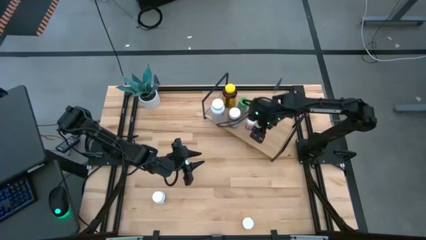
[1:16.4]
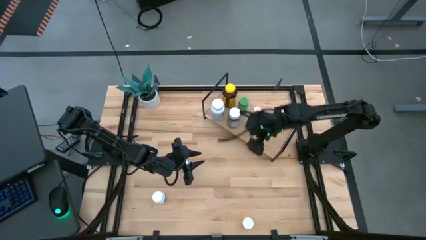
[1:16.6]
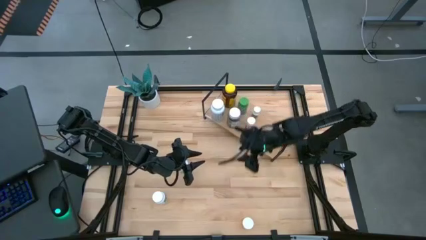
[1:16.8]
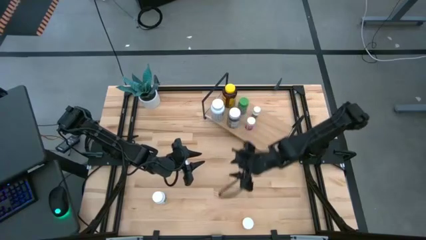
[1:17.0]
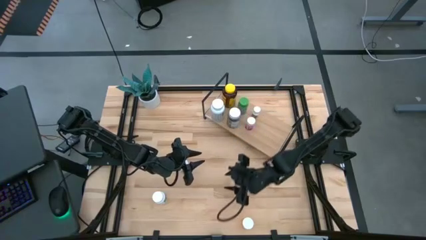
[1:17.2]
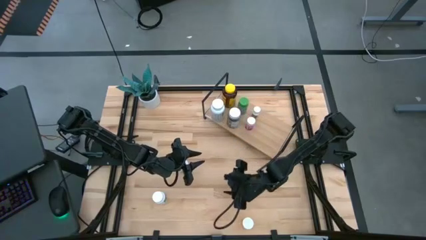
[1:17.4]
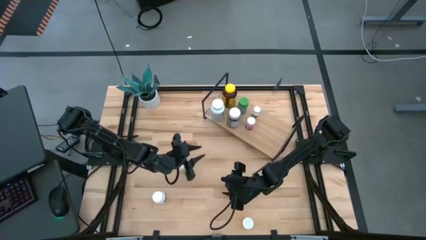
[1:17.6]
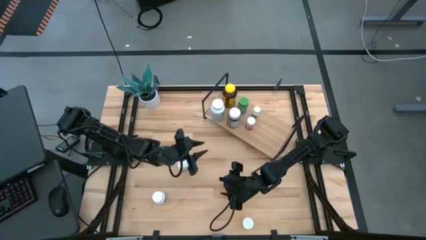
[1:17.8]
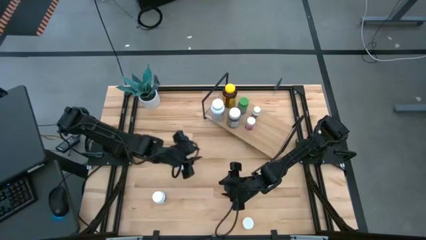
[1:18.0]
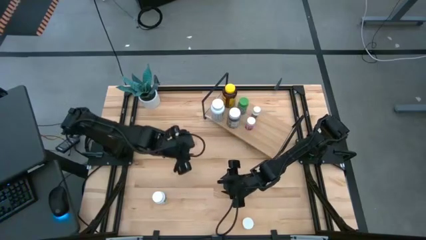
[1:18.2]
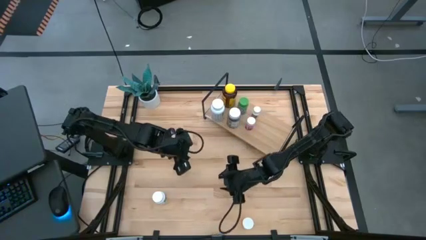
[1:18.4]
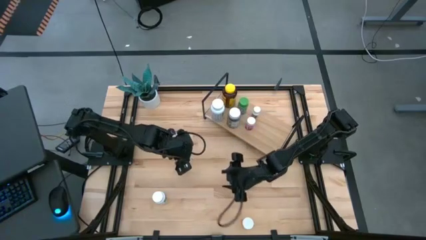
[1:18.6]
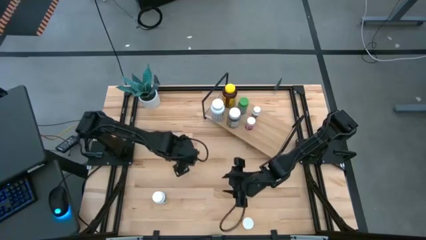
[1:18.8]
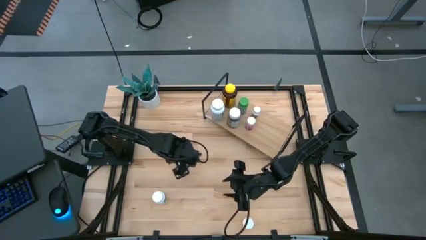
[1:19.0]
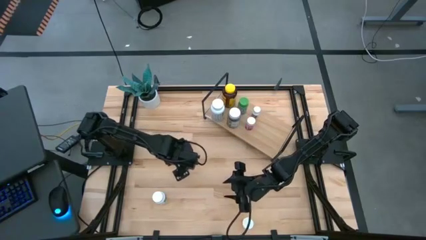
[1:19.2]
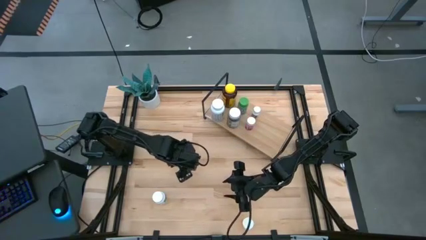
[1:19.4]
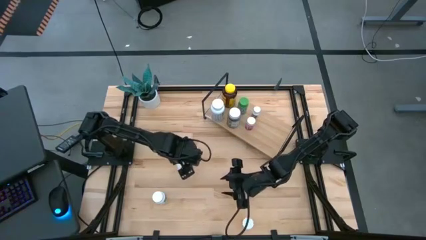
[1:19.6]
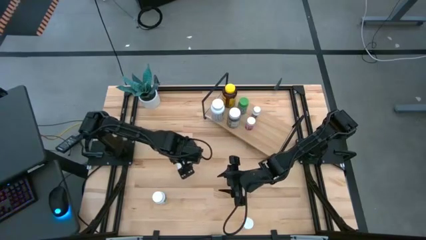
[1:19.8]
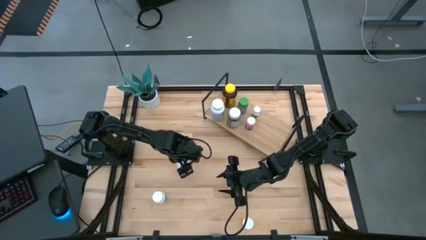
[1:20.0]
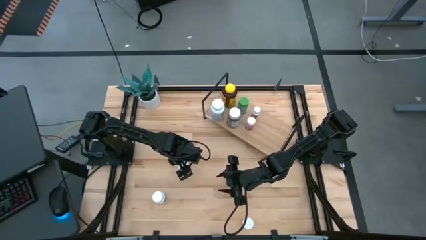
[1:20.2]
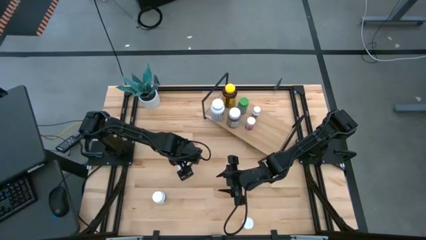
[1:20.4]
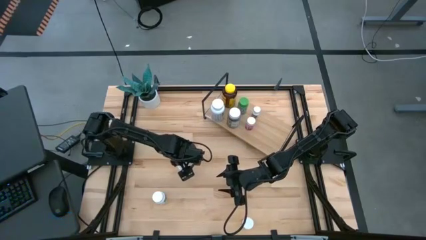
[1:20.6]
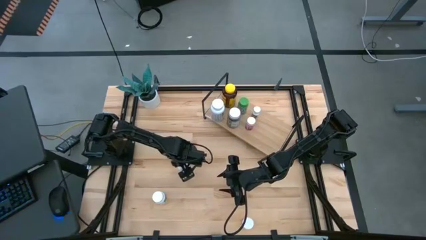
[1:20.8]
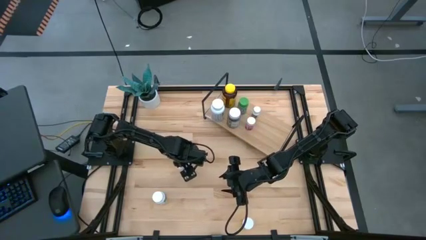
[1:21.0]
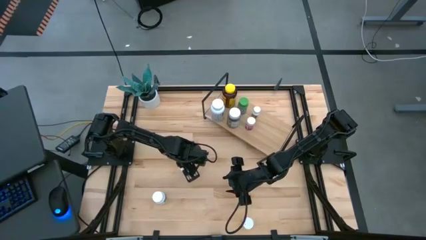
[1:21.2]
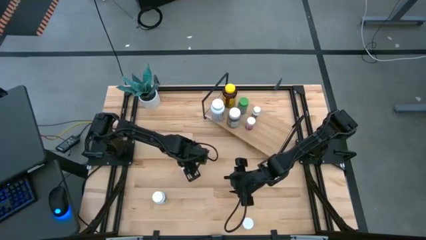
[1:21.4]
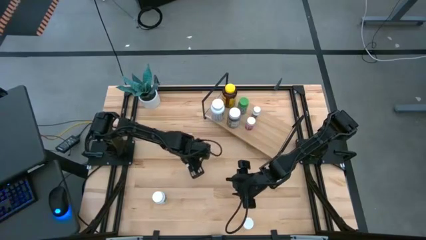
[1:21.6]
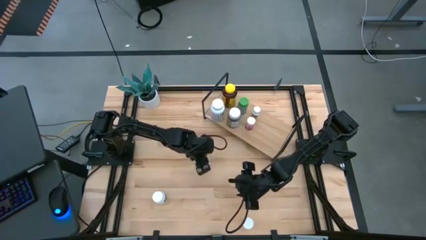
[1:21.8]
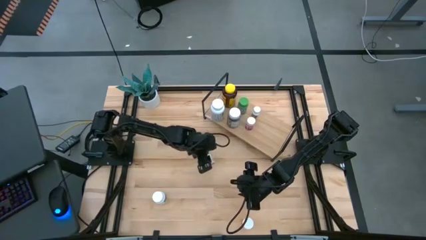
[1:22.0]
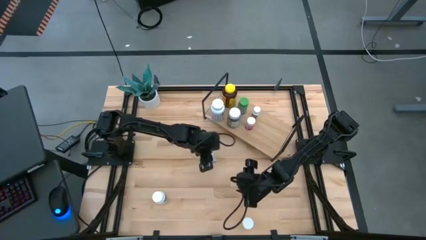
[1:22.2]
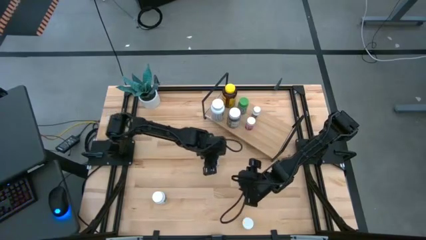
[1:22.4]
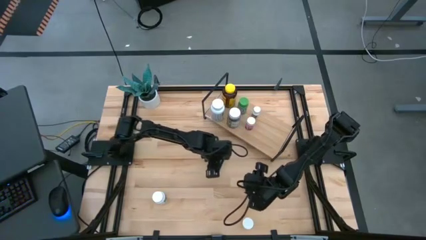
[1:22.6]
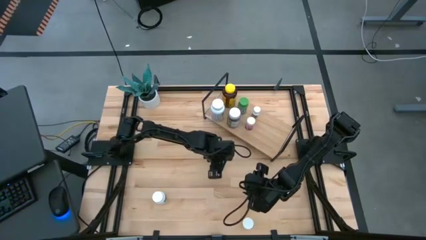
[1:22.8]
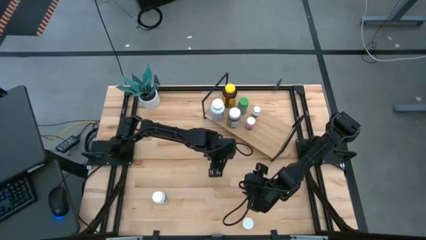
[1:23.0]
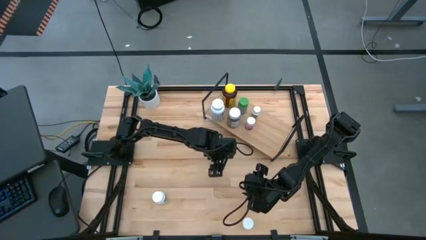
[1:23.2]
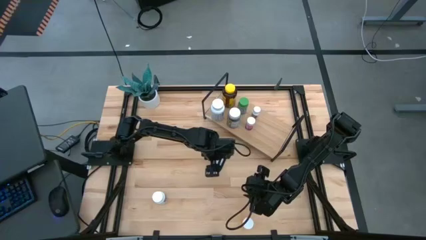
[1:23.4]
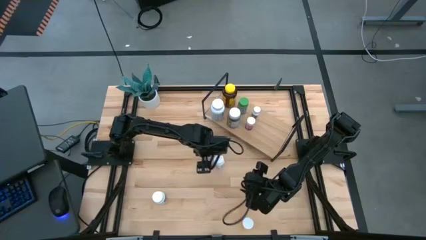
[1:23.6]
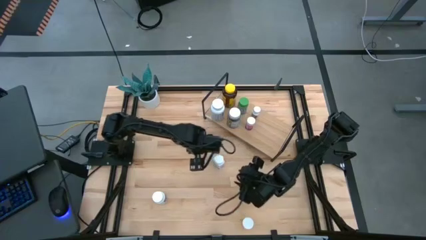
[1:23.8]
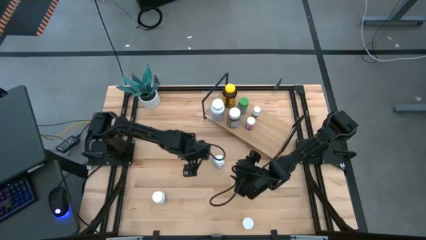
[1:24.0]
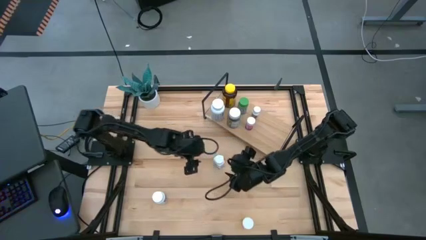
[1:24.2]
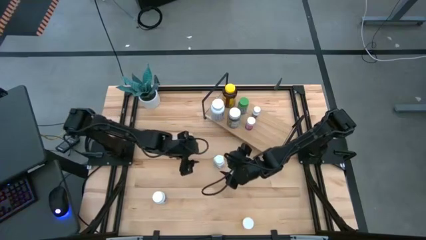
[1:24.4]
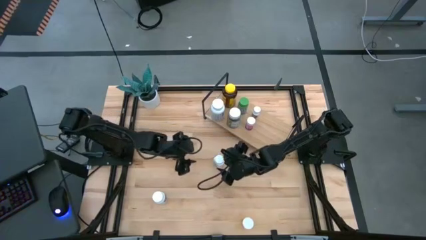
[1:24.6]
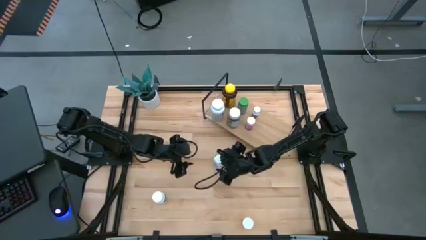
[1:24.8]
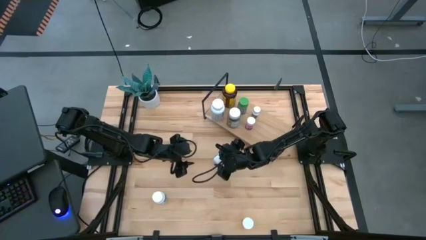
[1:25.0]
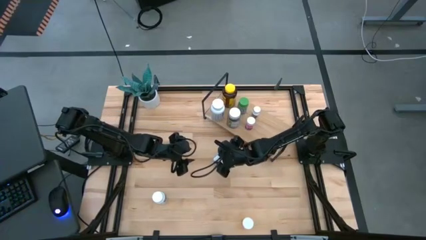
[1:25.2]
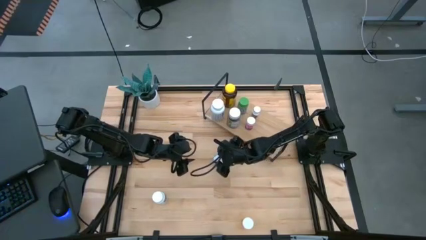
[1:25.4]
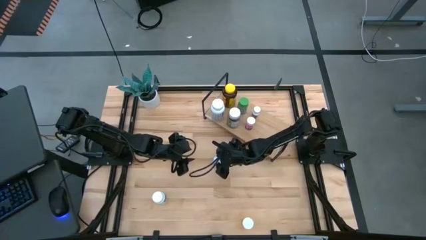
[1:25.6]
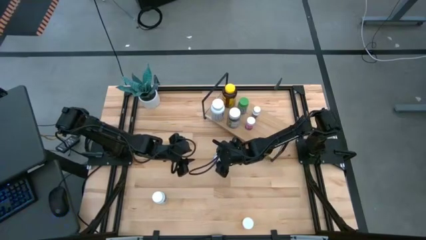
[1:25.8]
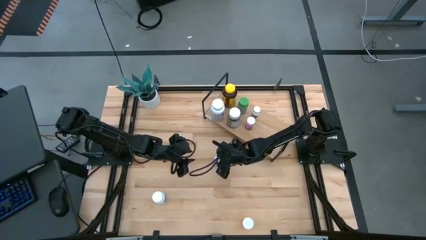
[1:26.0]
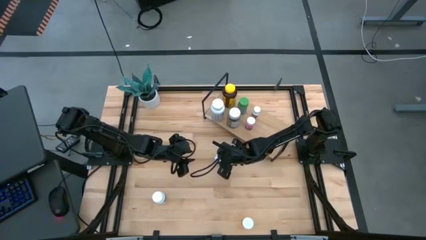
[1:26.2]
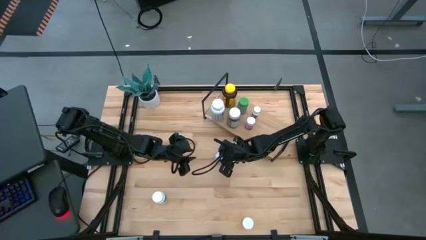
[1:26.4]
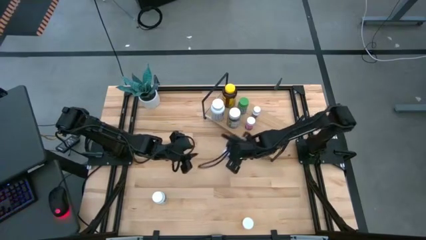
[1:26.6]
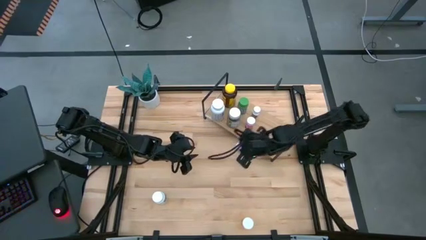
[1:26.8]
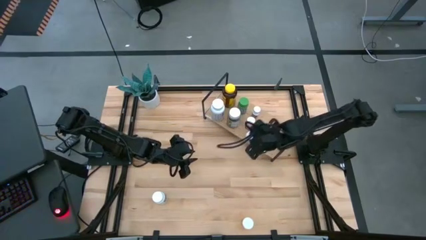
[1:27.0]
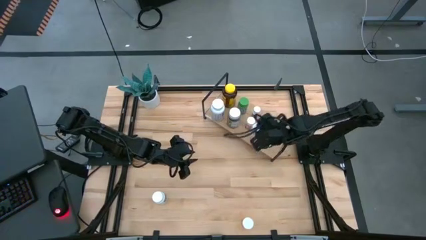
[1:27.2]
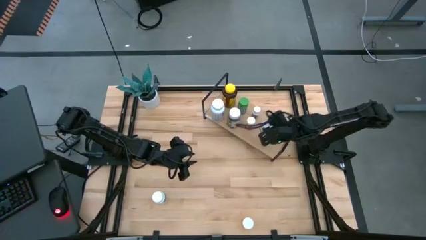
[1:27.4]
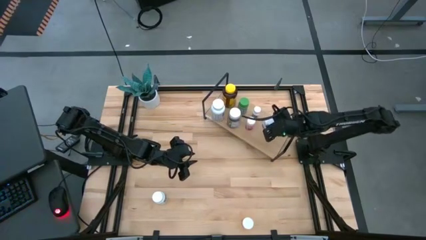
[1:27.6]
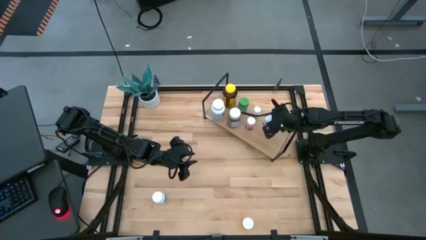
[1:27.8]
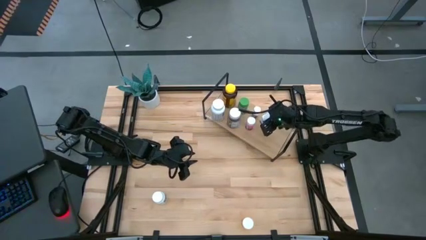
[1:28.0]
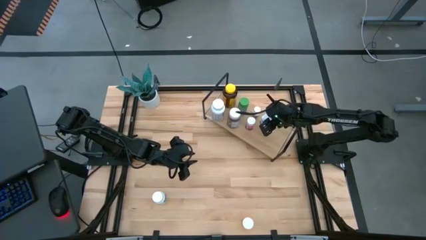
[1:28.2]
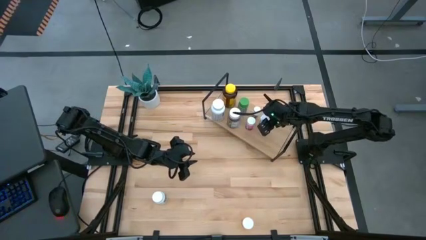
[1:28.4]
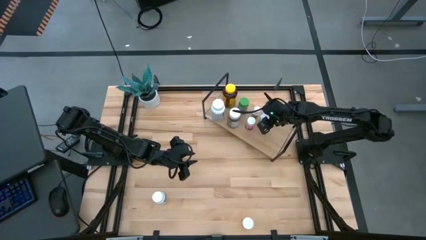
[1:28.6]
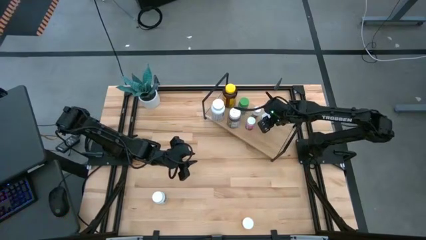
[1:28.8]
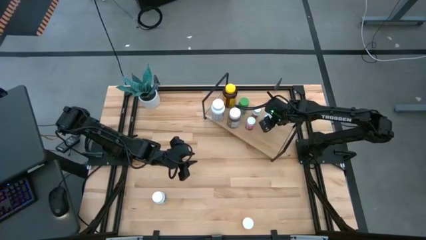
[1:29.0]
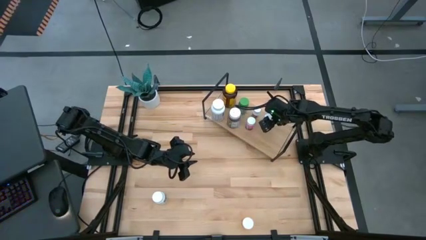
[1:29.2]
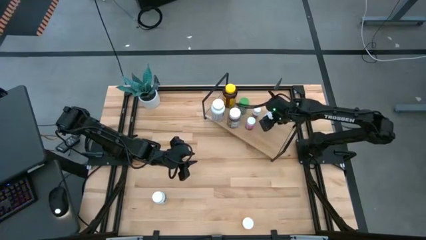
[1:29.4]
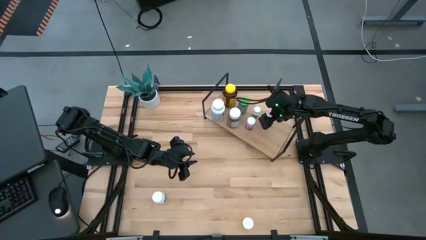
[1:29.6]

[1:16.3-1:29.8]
Task: Pick and place medicine bottles onto shelf by color
Put the white and blue pill bottle on the shelf
